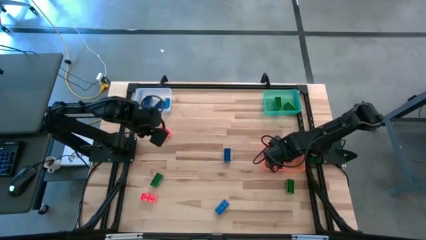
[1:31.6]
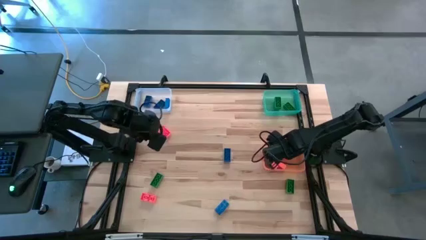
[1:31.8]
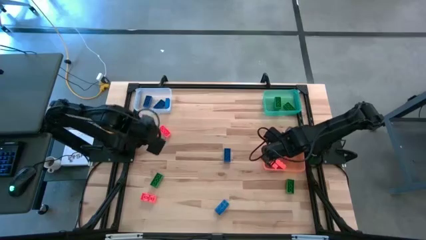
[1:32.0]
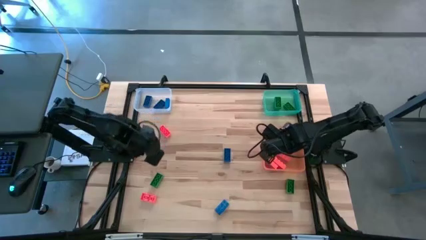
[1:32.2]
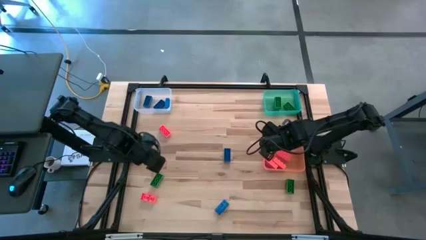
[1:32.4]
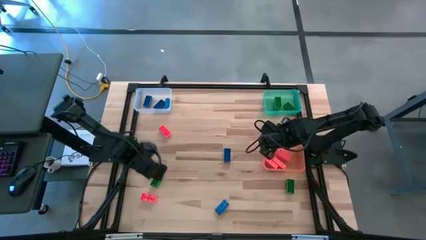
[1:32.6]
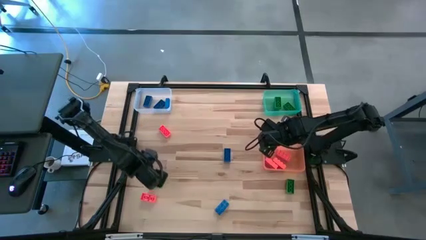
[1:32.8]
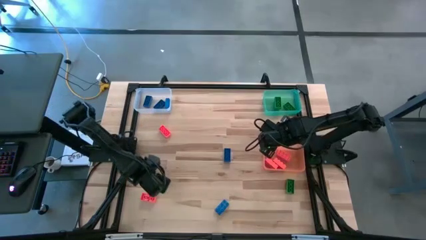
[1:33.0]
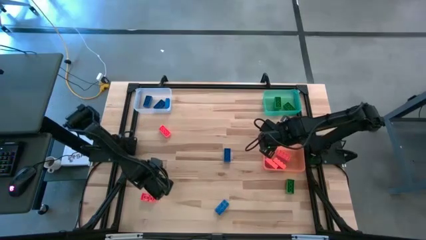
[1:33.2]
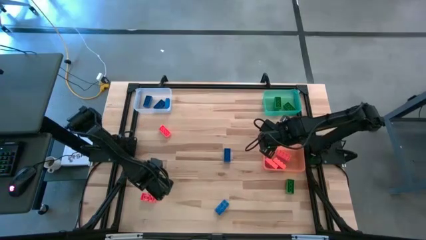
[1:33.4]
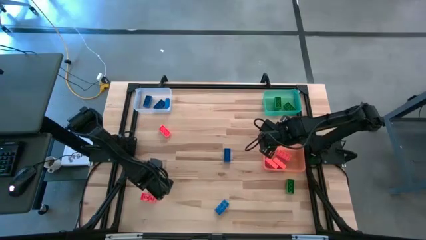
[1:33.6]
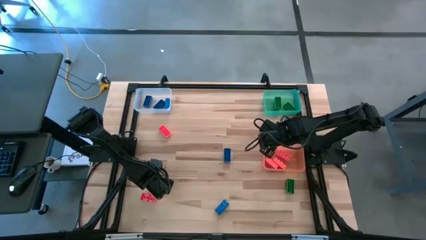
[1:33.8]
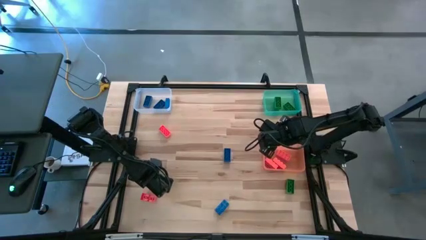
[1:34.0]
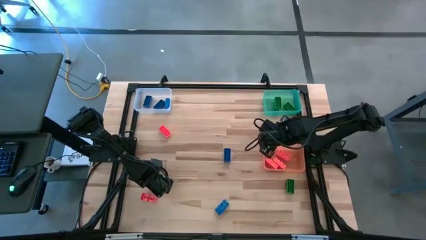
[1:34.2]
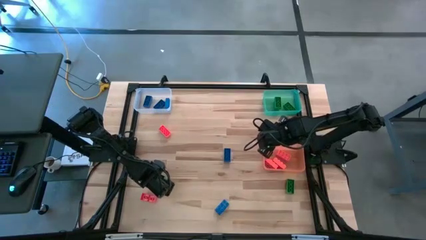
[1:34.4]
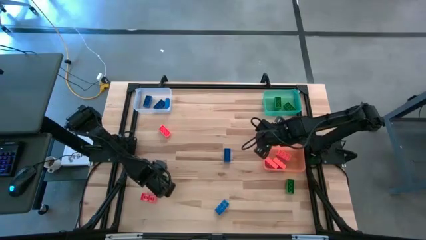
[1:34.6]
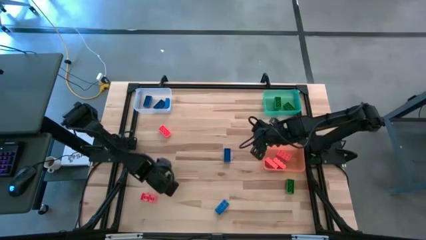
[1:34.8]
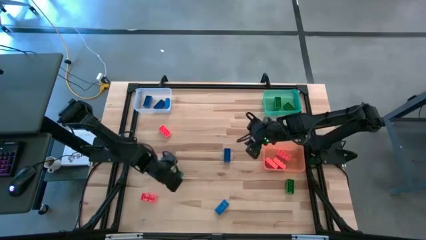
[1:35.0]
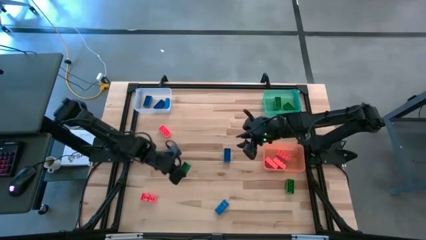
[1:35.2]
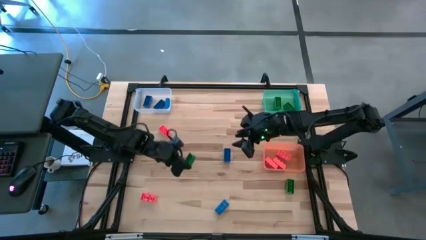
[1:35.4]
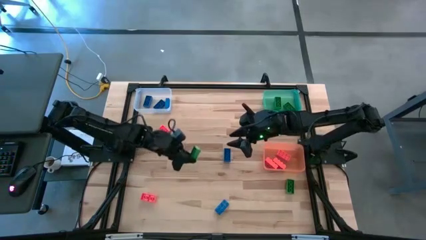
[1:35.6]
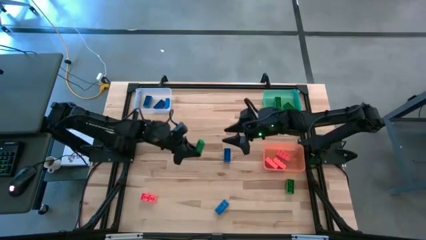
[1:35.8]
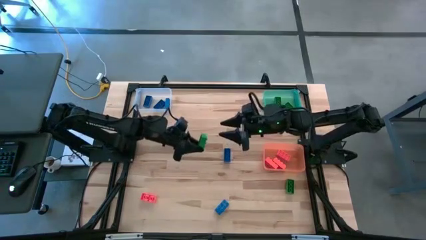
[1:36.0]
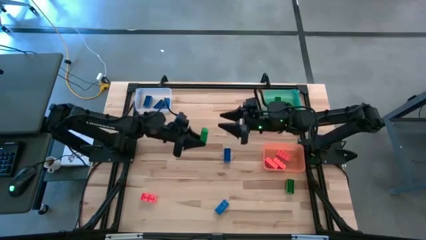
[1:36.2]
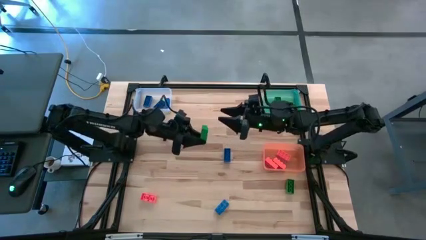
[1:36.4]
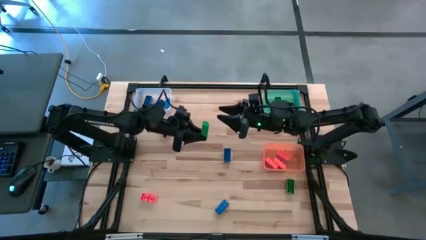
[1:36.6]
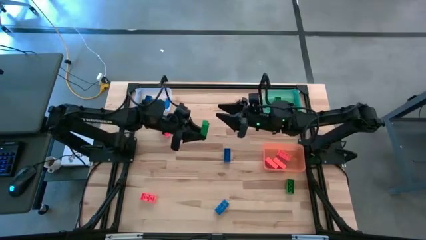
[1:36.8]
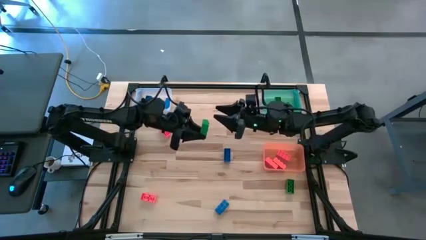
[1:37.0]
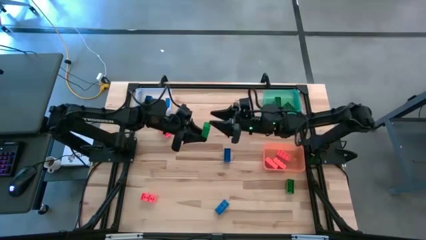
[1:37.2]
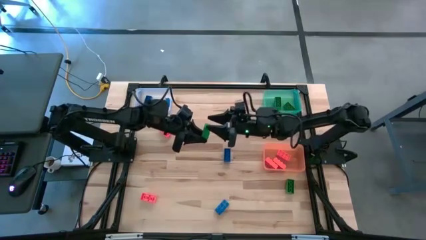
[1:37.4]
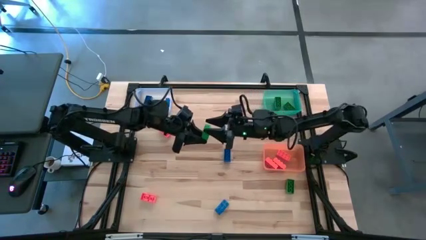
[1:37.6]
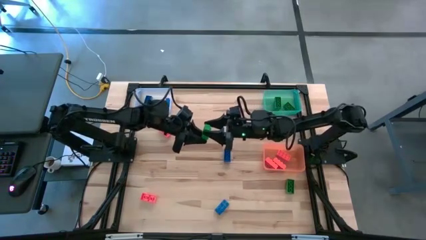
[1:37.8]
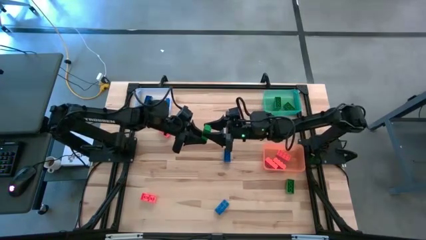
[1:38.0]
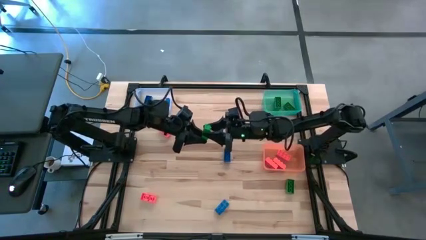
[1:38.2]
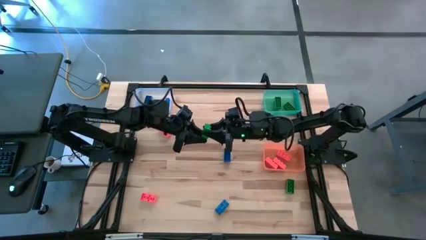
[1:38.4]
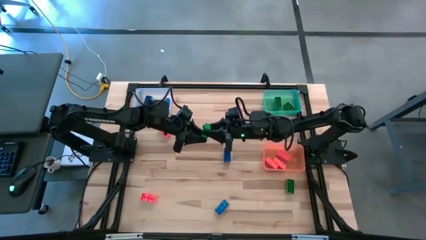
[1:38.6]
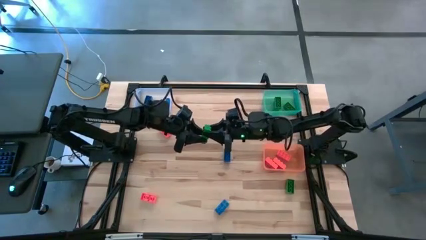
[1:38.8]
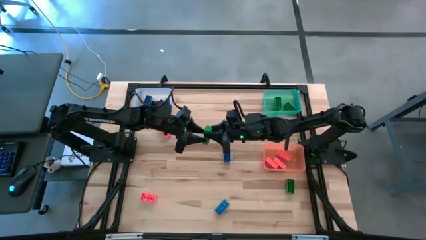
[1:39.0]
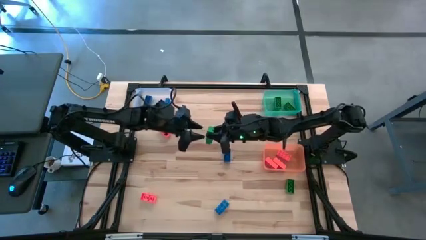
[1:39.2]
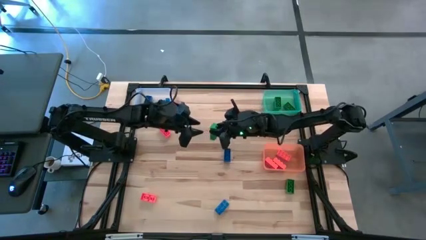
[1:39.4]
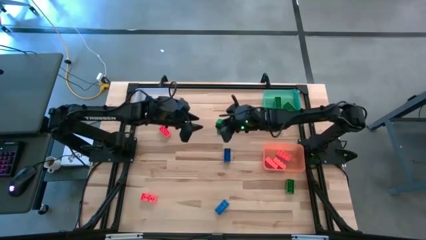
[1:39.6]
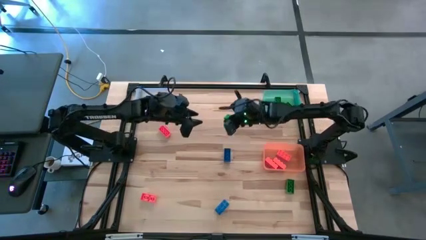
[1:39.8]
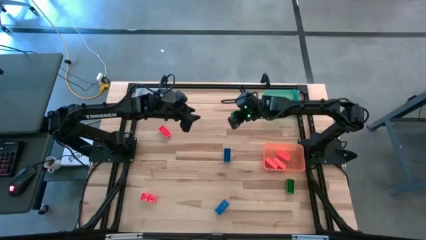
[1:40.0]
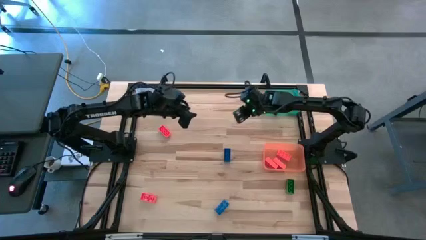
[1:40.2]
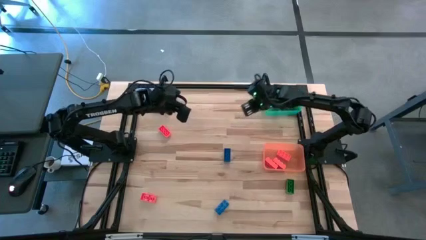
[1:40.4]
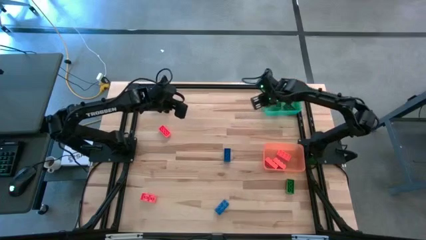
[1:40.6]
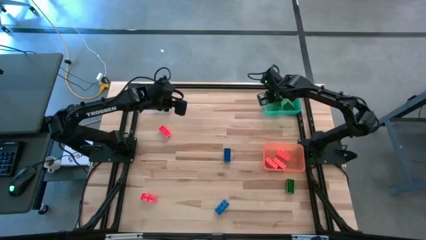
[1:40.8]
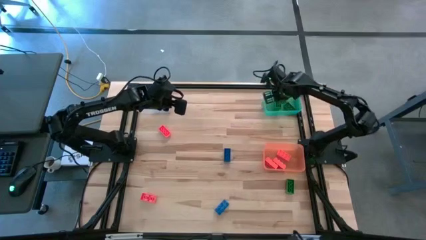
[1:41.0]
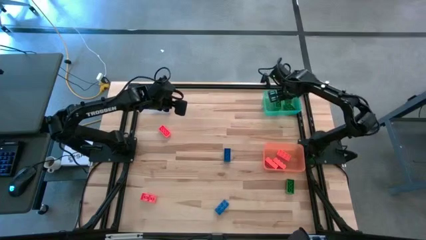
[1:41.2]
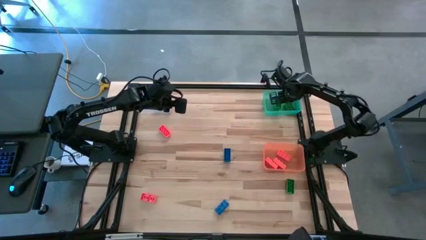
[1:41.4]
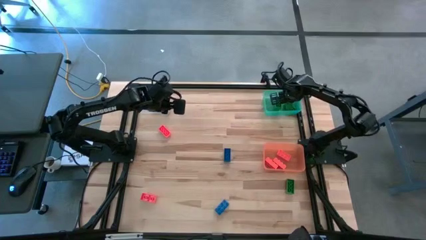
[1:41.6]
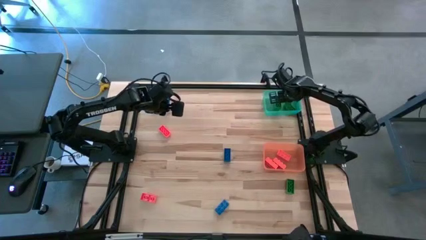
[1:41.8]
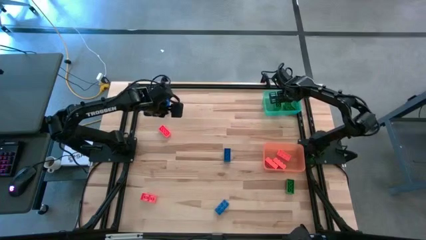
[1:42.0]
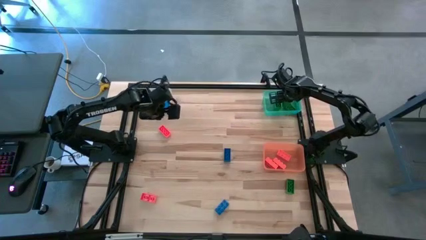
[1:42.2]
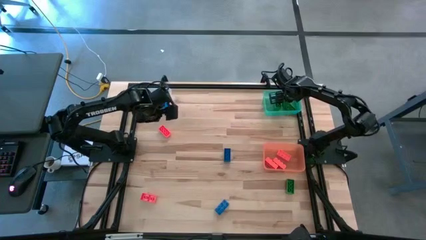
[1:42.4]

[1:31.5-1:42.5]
Task: Sort & place blocks by color
Put the green game piece into the green bin

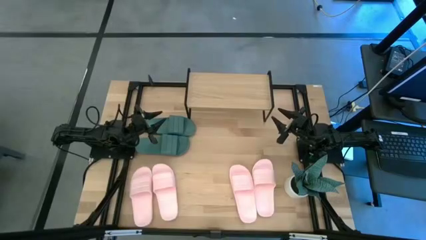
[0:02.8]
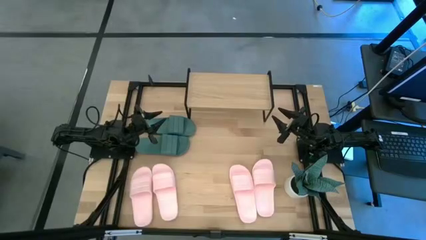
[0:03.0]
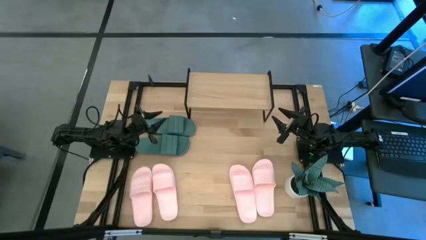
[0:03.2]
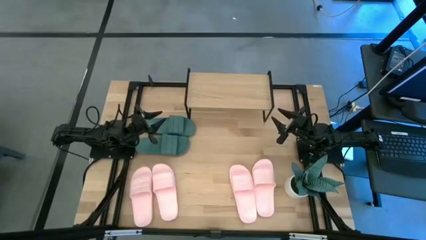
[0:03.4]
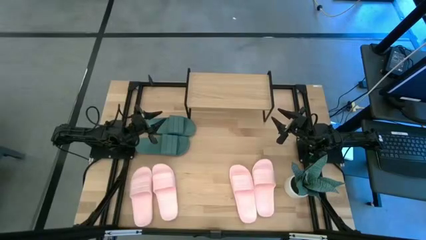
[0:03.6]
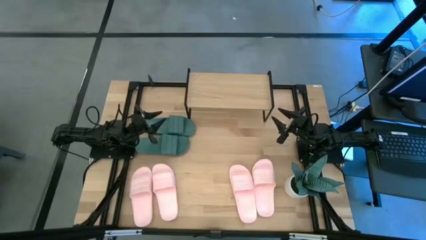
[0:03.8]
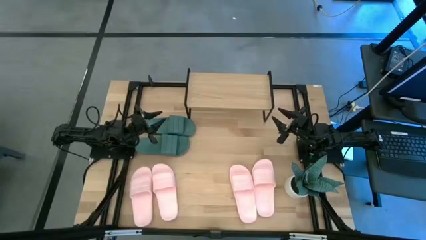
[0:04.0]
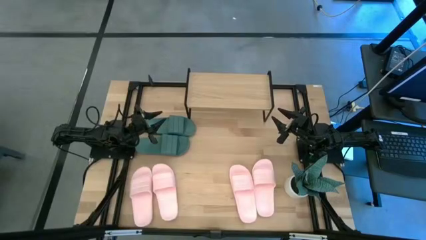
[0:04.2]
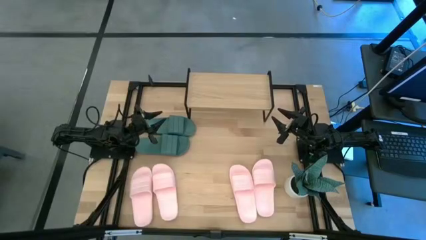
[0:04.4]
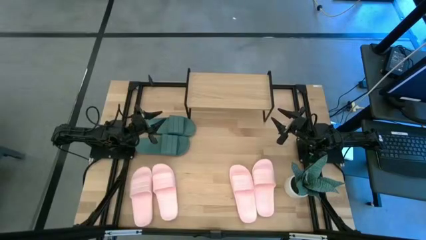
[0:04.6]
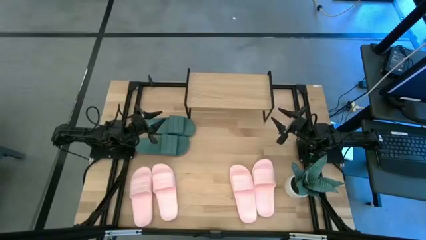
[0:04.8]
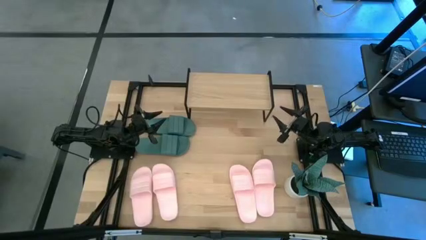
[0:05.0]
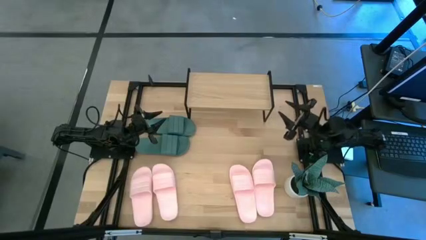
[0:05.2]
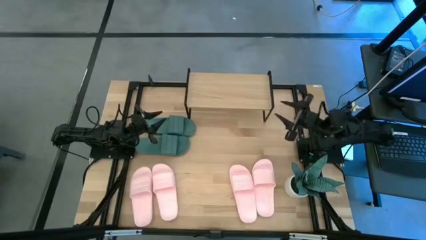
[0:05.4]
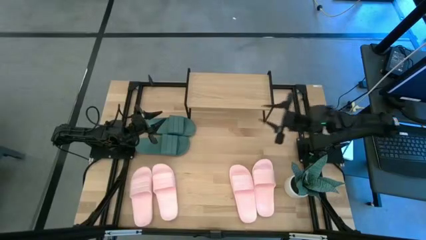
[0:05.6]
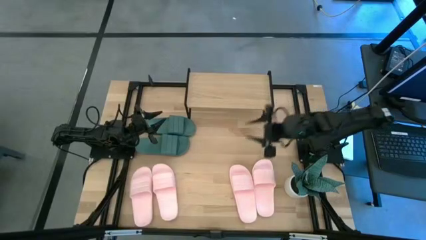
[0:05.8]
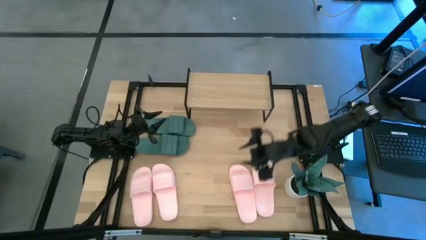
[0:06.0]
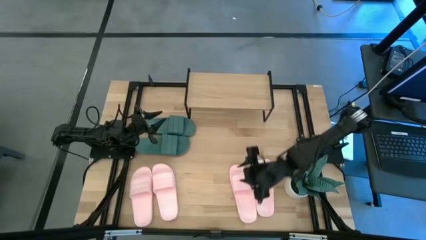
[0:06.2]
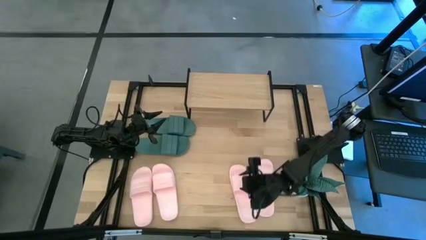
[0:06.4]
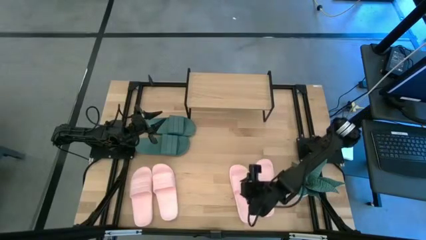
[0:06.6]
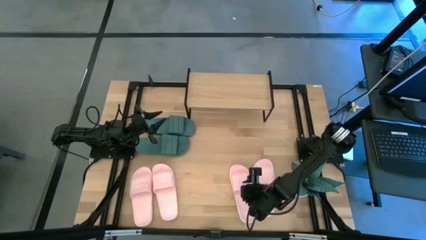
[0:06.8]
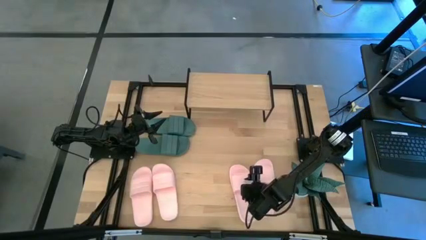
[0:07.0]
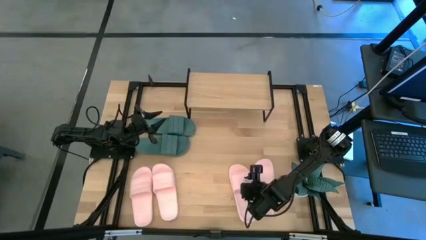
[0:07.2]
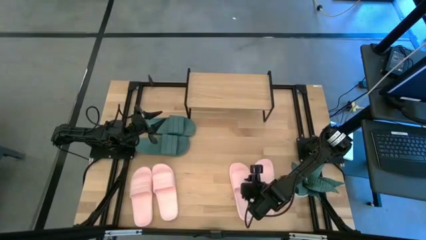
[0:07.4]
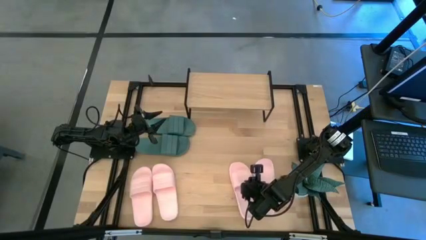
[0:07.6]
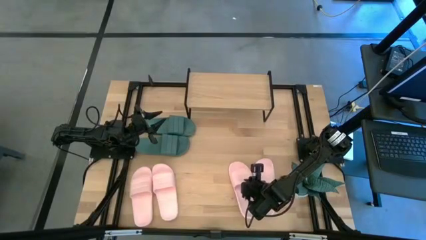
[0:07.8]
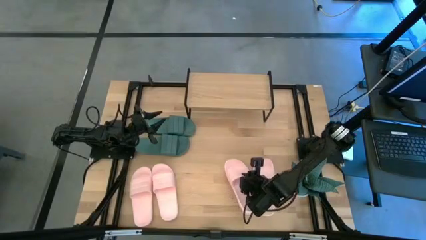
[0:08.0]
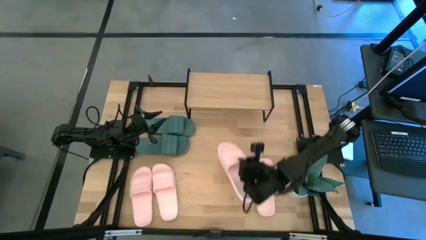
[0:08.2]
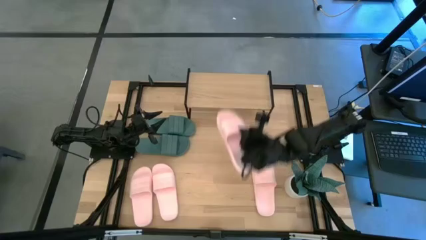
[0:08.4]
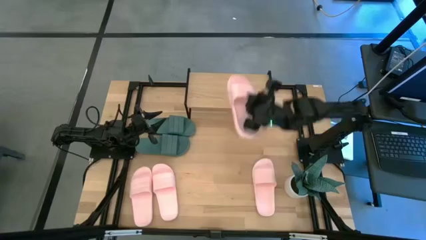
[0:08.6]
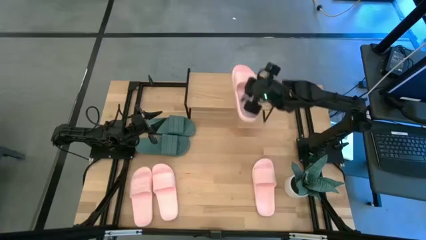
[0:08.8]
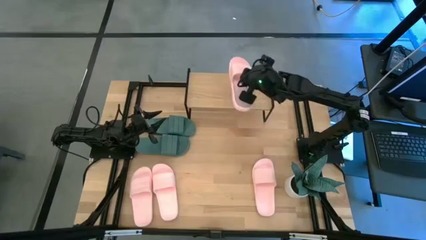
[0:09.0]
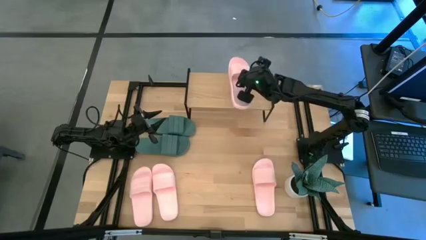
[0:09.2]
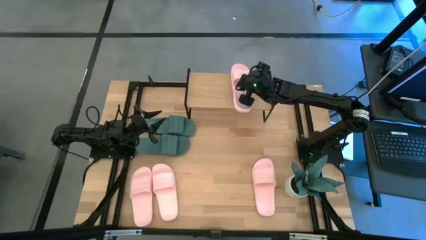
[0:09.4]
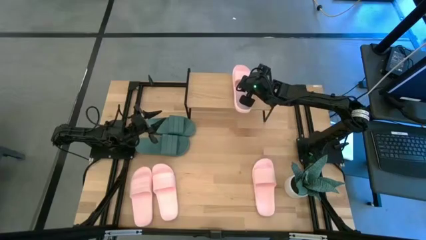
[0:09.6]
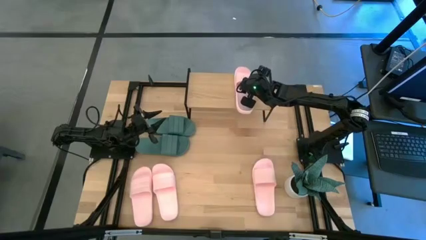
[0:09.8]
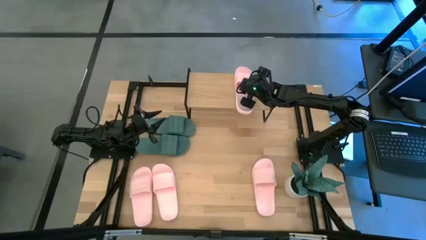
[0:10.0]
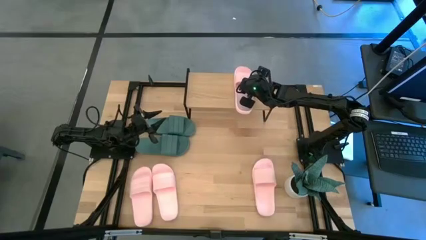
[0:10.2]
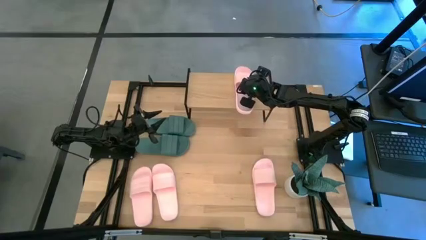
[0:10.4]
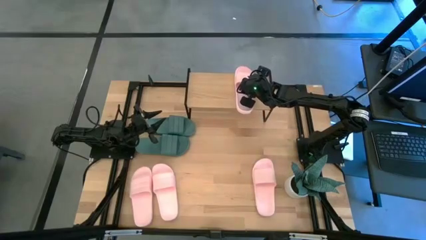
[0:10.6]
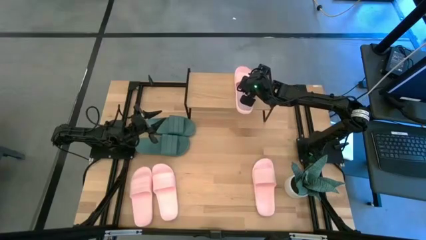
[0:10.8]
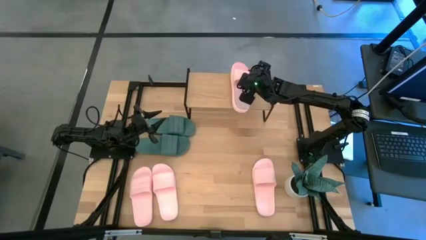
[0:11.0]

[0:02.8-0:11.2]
Task: Pick and place slides into the shelf
Put the pink slipper on the shelf
